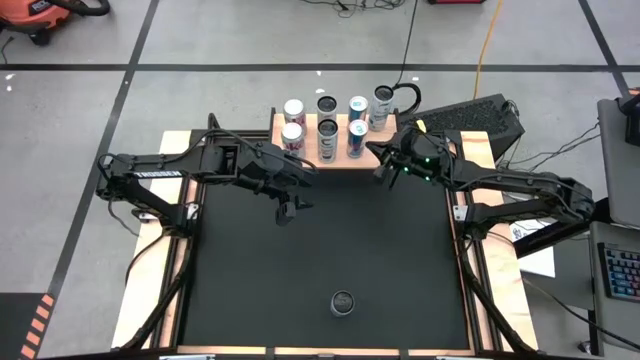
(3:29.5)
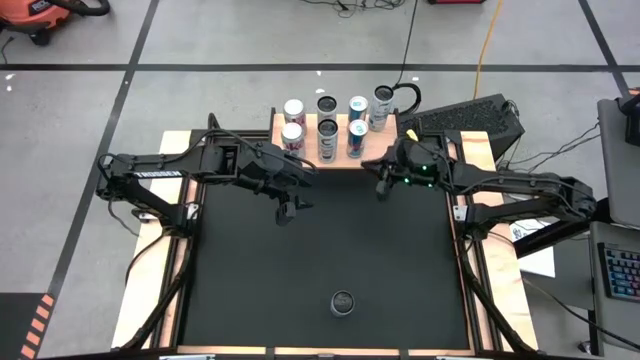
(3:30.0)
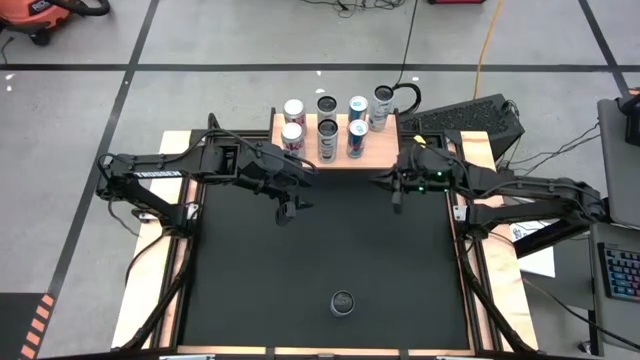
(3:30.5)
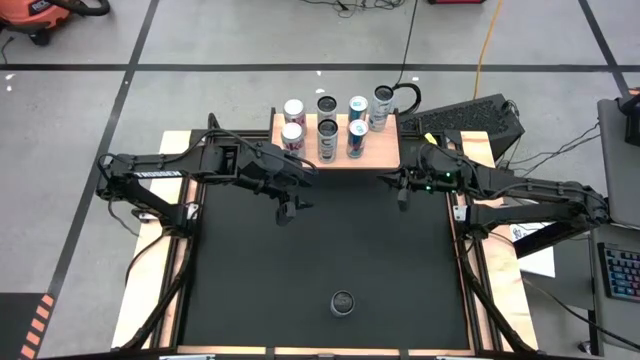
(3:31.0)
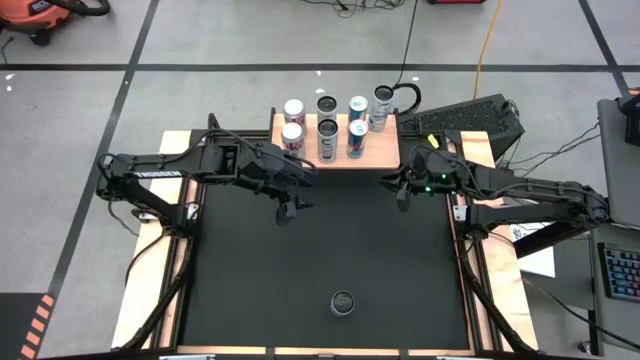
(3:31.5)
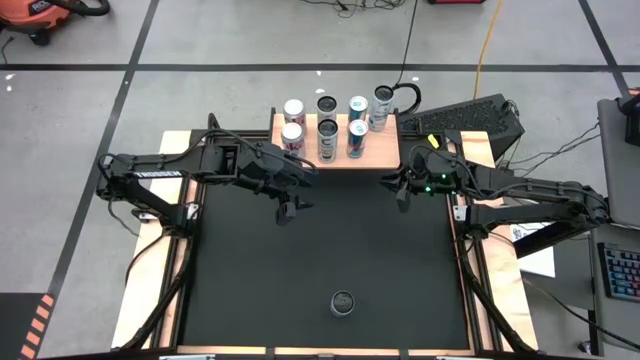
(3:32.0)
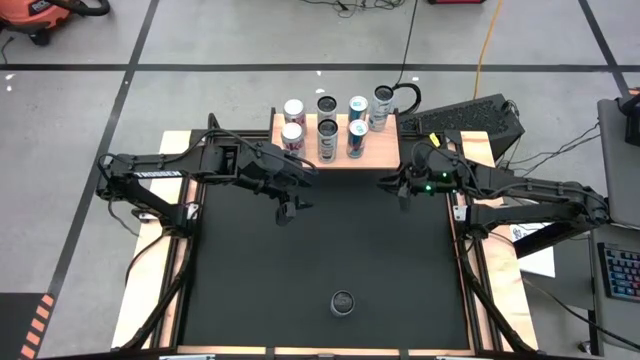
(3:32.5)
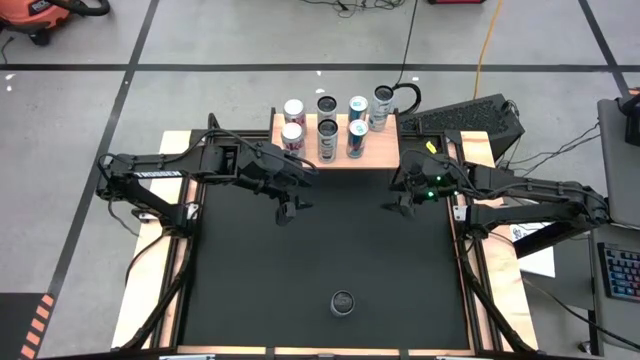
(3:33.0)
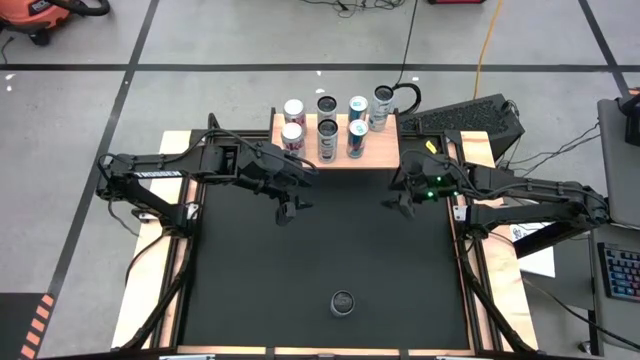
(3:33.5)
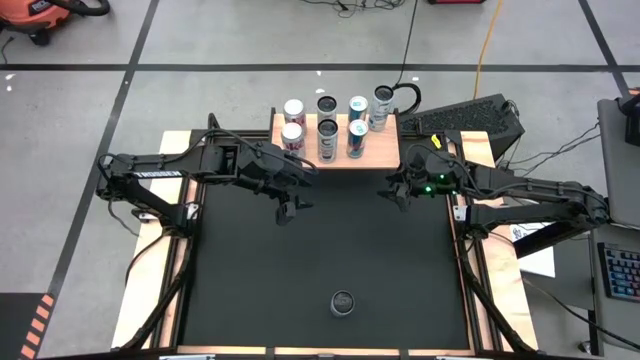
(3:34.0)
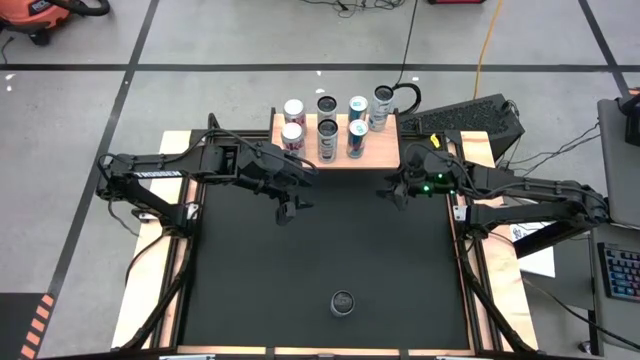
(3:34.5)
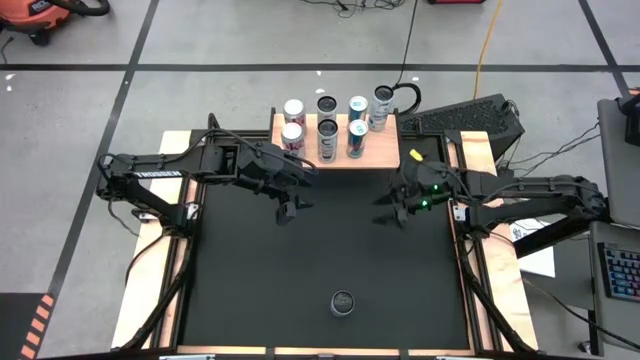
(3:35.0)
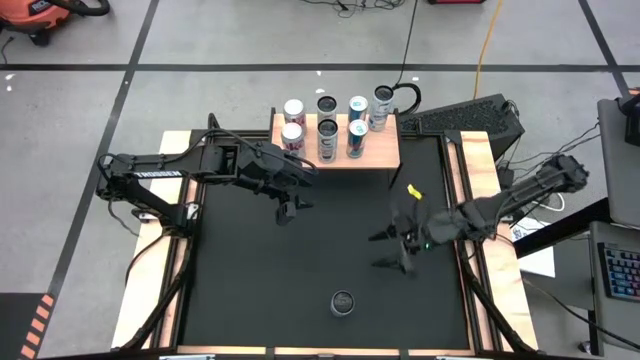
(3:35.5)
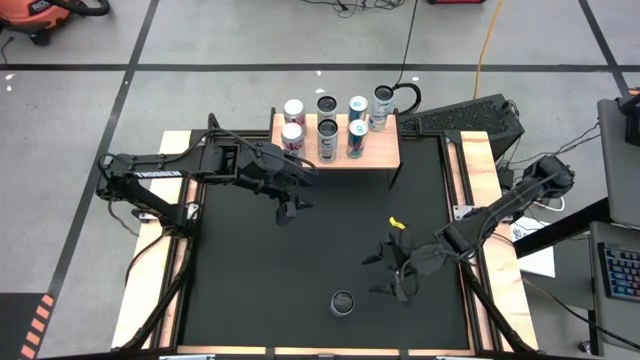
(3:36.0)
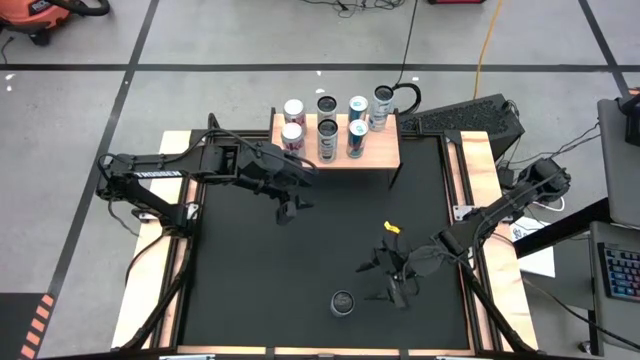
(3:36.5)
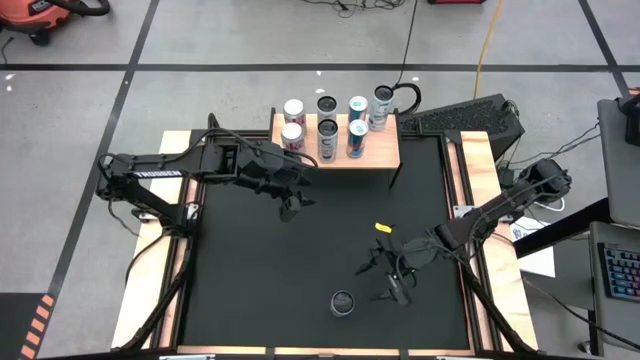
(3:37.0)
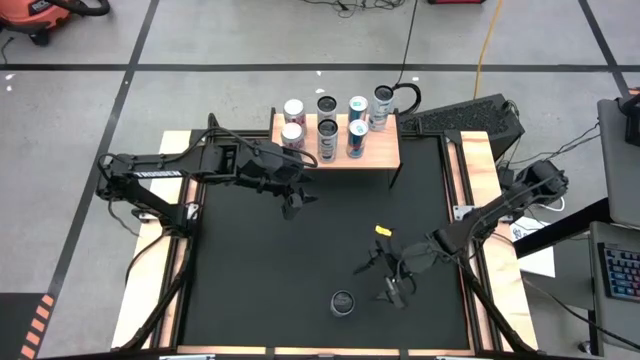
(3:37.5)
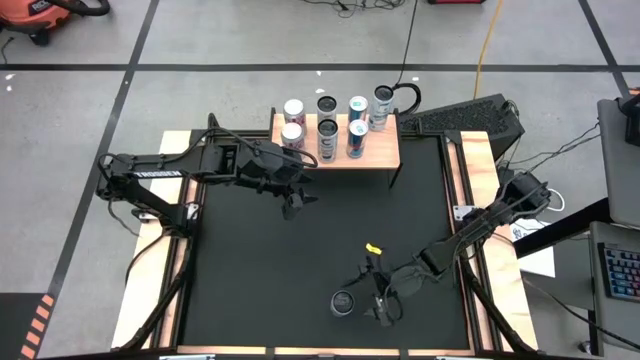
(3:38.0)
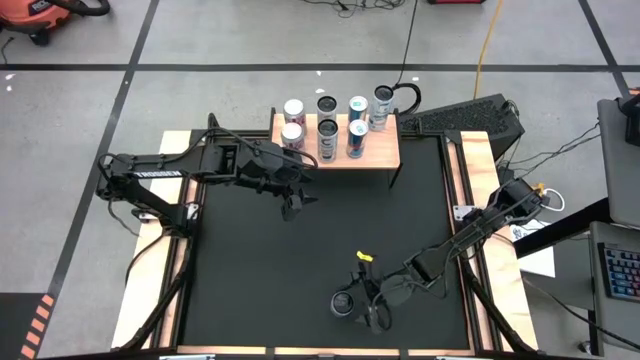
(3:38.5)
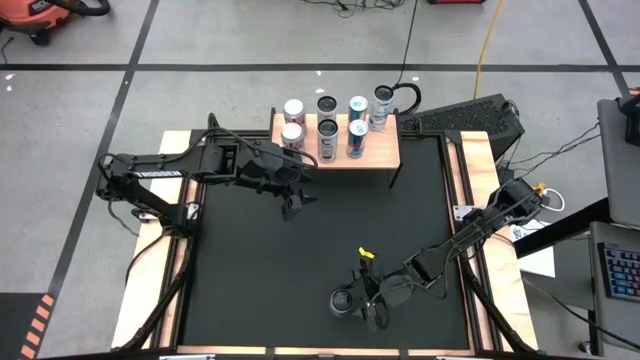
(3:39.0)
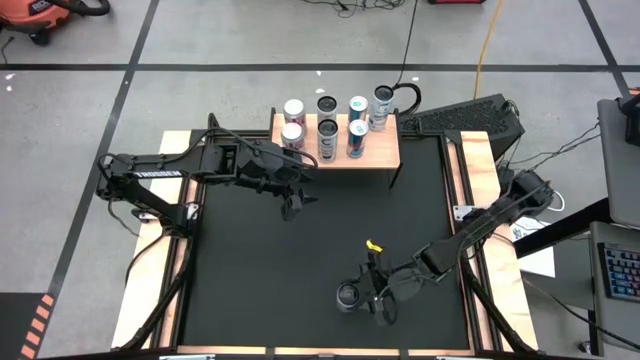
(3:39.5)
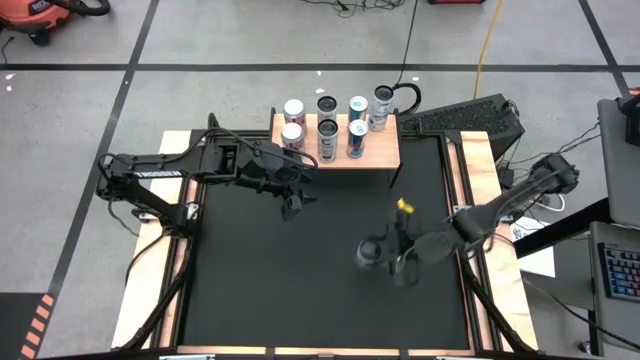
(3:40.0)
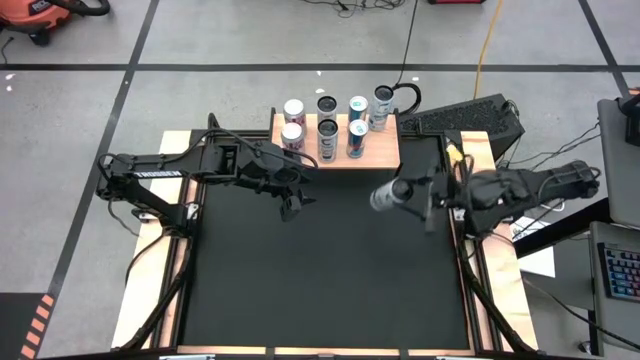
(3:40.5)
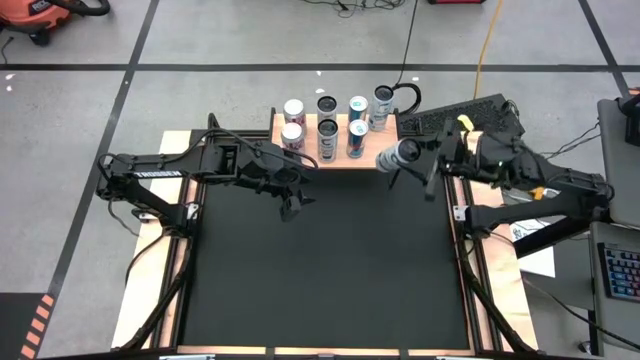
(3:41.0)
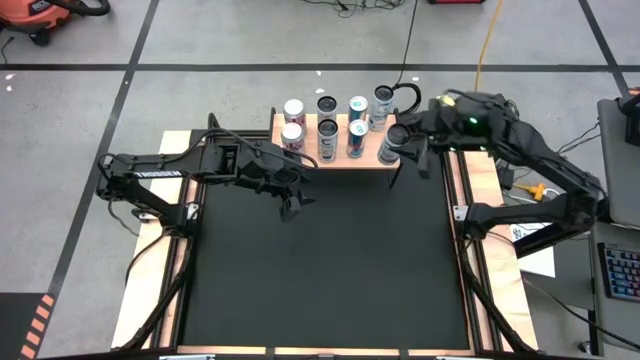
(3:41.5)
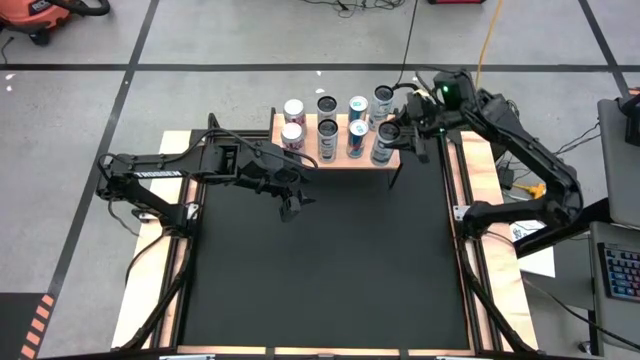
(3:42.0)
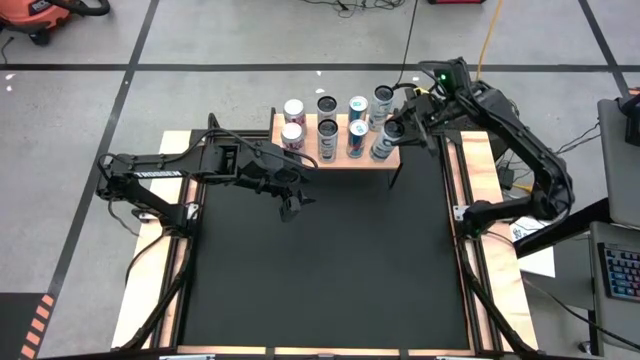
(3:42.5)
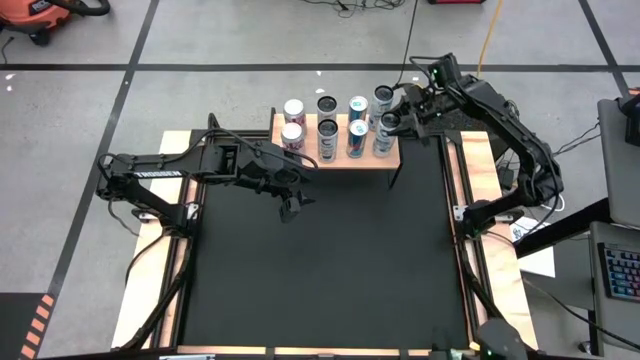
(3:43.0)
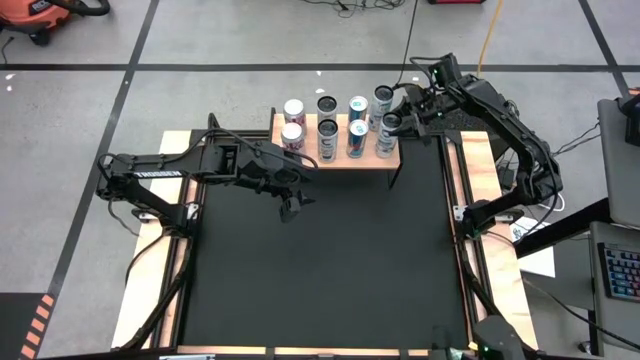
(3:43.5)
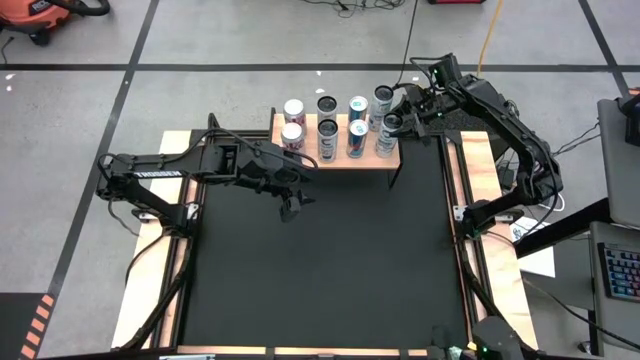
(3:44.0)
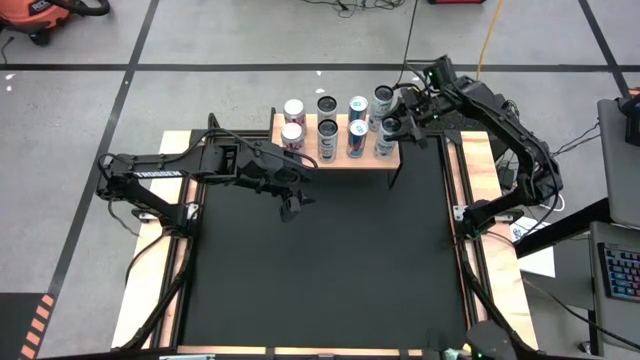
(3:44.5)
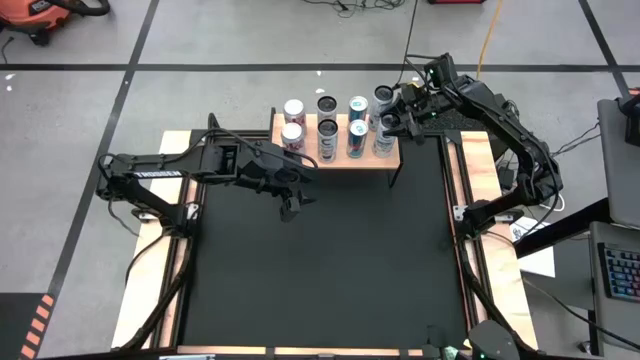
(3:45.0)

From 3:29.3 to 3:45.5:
Task: Place canned beverage on shelf
Put the white and blue soda can aligned with the other white and blue soda can on the shelf
